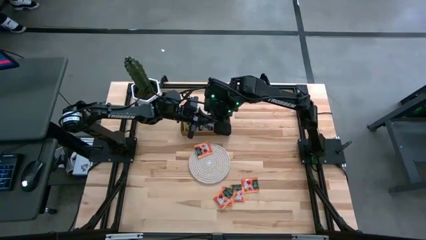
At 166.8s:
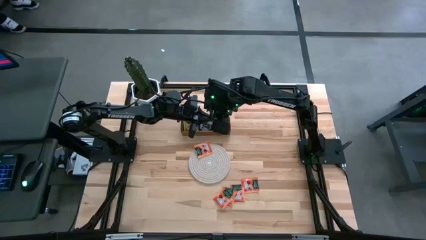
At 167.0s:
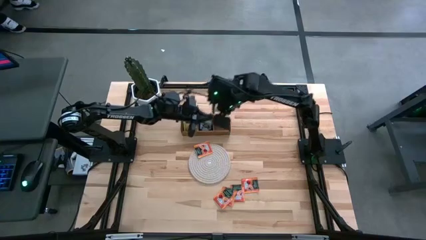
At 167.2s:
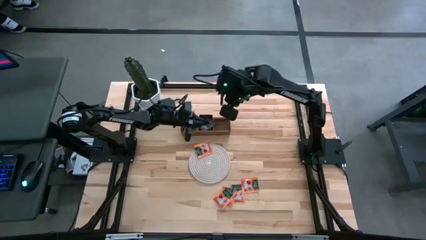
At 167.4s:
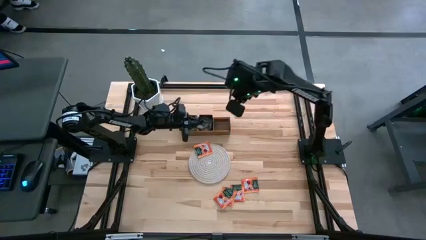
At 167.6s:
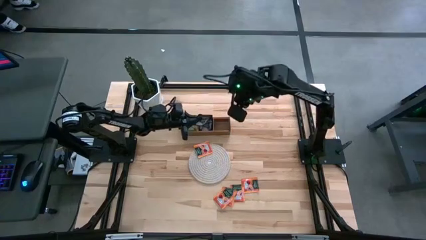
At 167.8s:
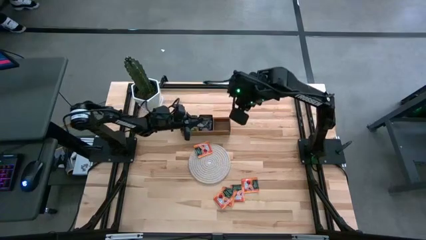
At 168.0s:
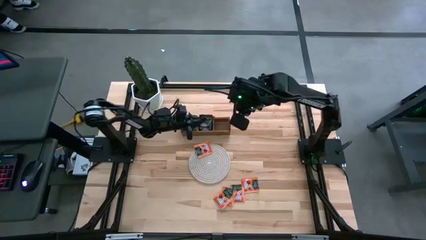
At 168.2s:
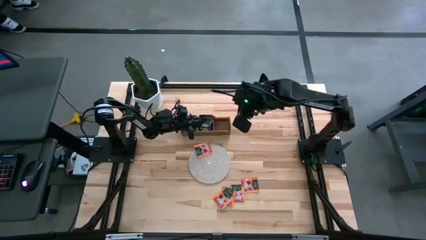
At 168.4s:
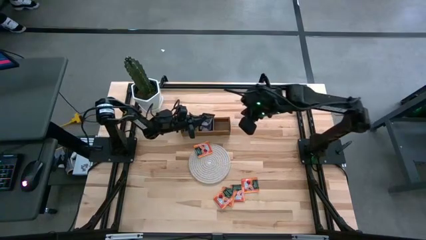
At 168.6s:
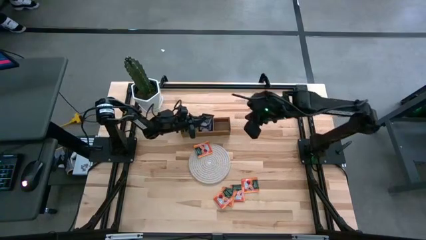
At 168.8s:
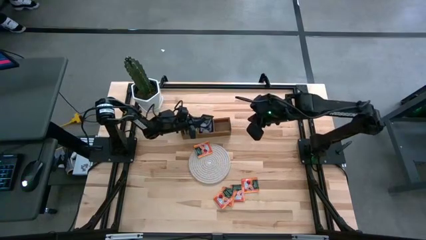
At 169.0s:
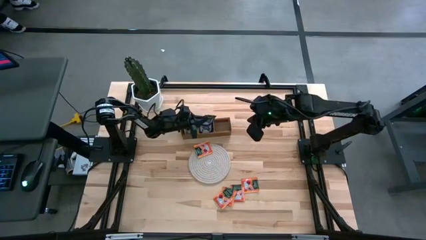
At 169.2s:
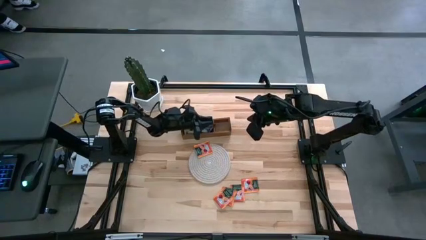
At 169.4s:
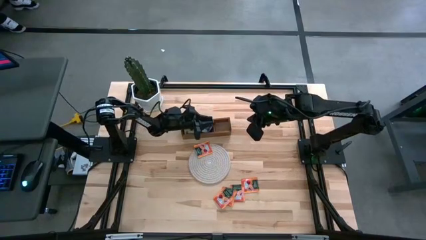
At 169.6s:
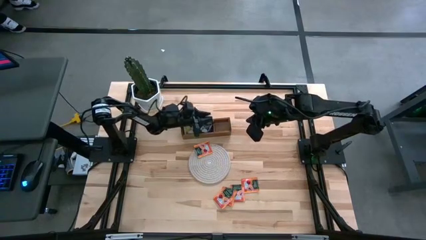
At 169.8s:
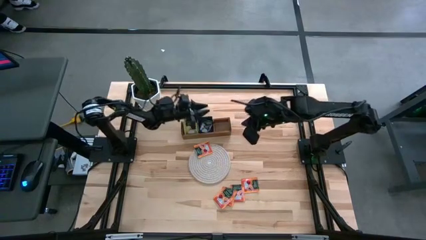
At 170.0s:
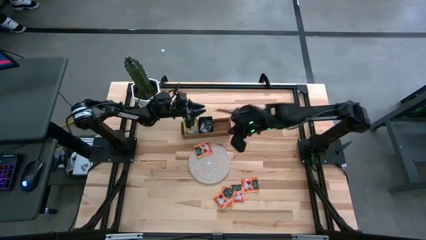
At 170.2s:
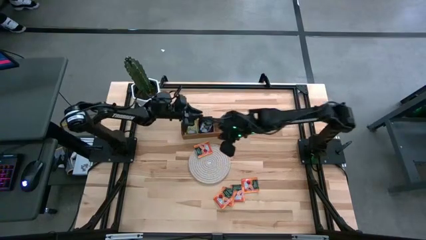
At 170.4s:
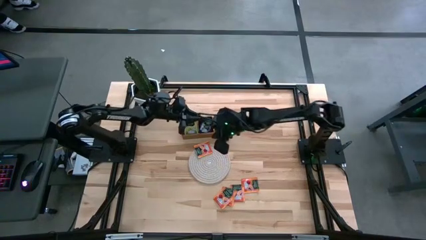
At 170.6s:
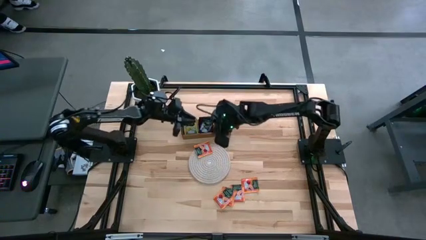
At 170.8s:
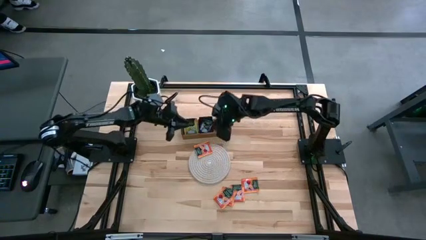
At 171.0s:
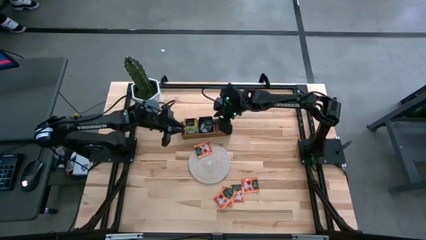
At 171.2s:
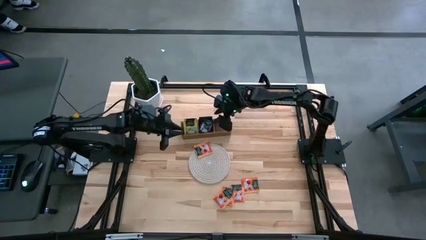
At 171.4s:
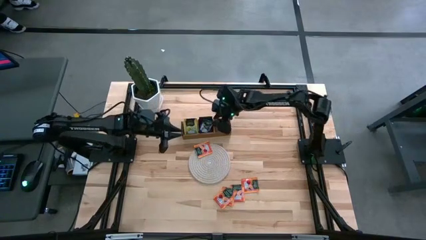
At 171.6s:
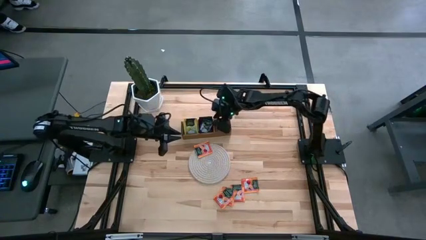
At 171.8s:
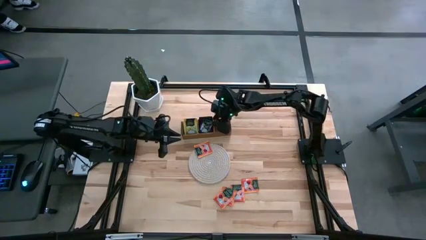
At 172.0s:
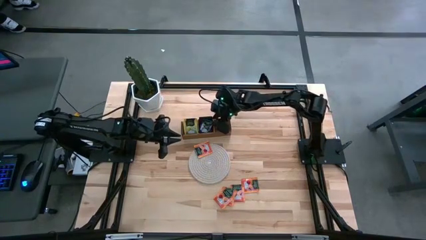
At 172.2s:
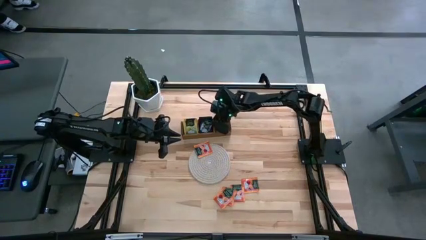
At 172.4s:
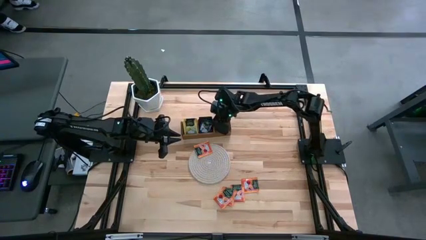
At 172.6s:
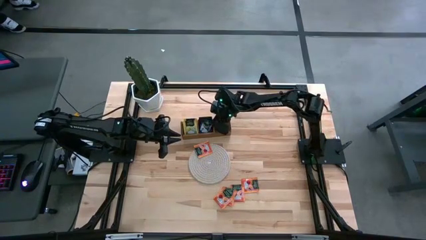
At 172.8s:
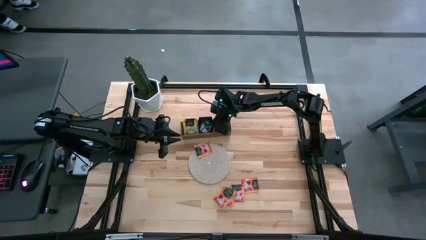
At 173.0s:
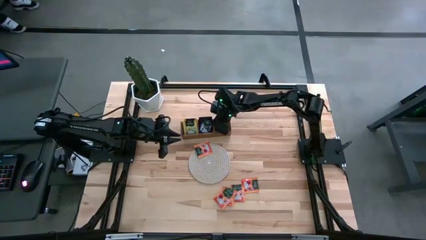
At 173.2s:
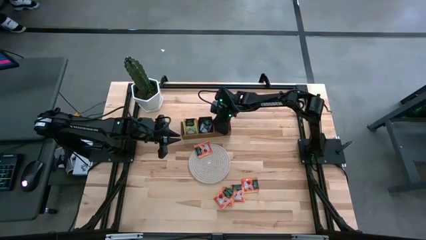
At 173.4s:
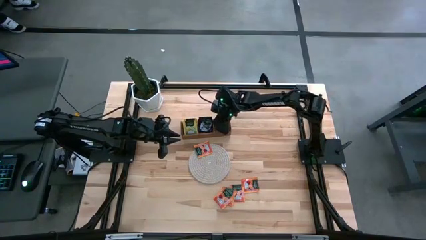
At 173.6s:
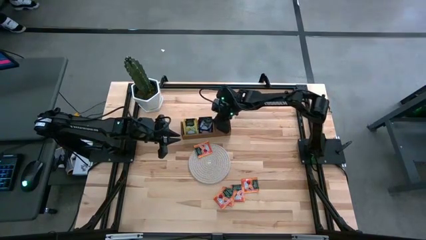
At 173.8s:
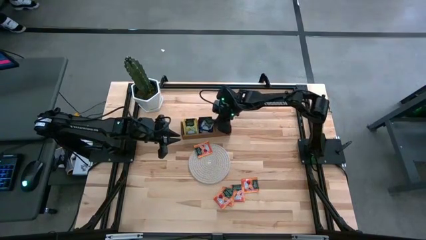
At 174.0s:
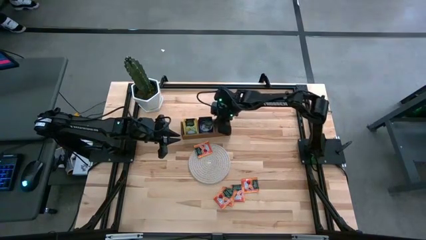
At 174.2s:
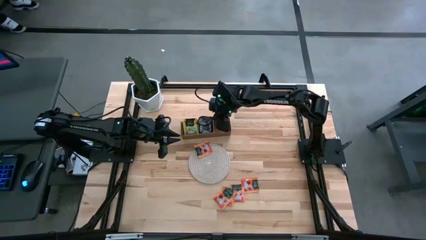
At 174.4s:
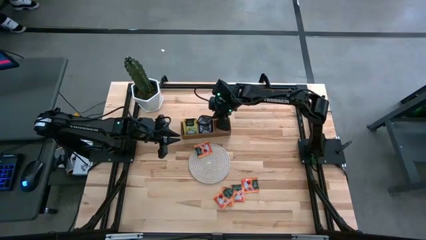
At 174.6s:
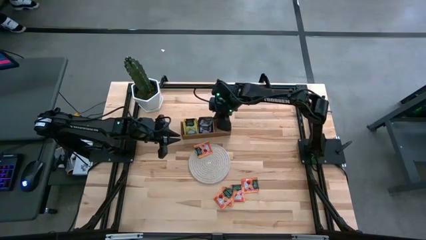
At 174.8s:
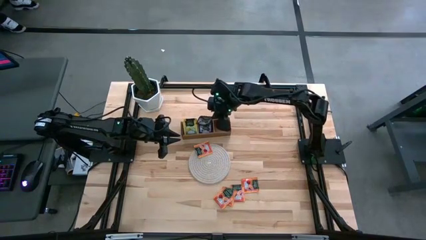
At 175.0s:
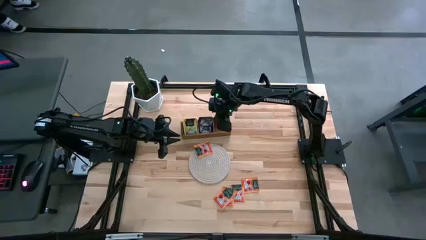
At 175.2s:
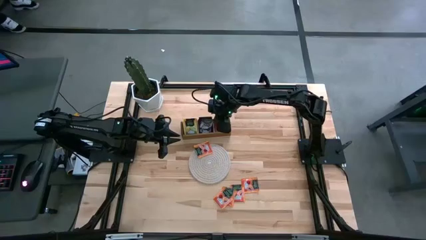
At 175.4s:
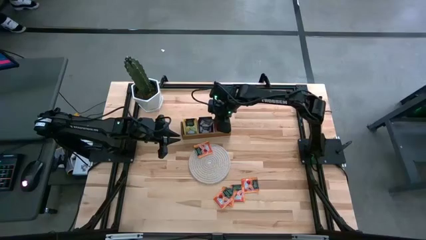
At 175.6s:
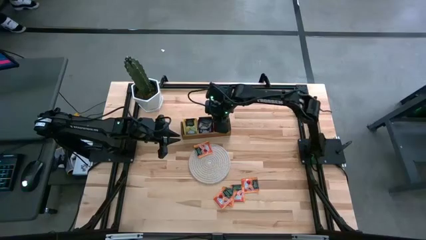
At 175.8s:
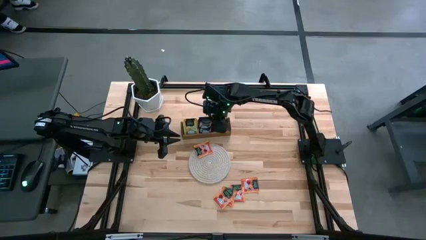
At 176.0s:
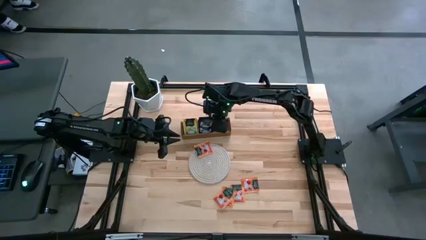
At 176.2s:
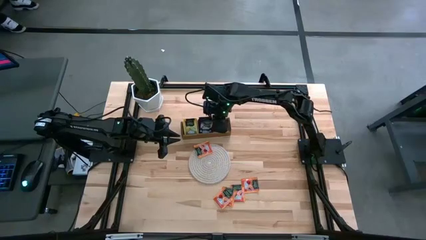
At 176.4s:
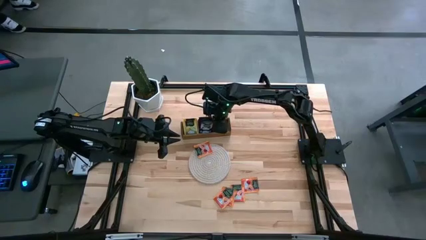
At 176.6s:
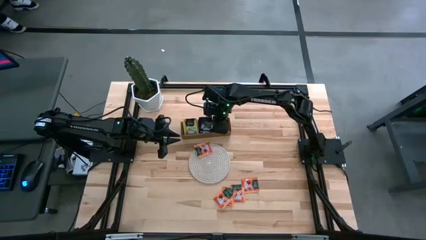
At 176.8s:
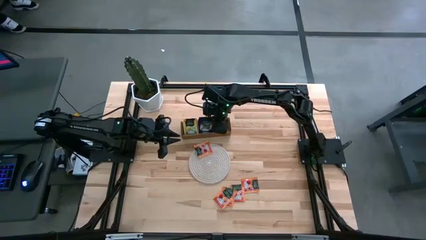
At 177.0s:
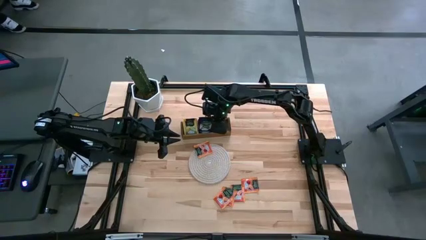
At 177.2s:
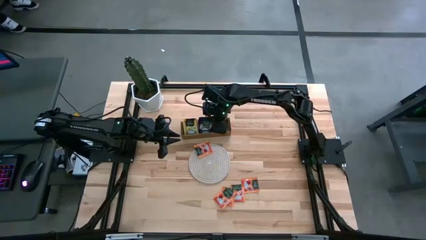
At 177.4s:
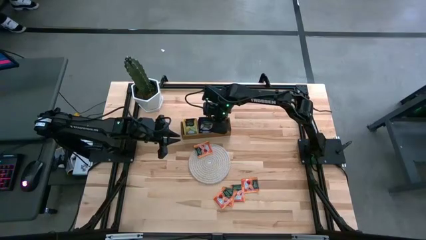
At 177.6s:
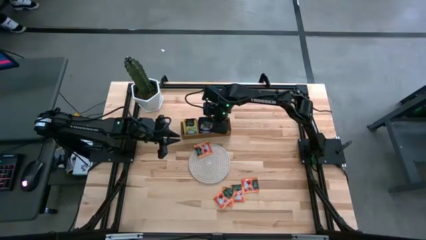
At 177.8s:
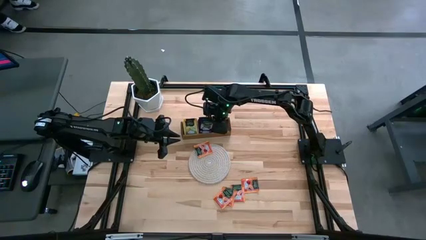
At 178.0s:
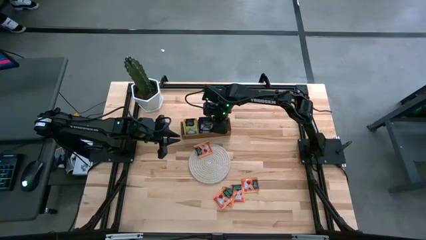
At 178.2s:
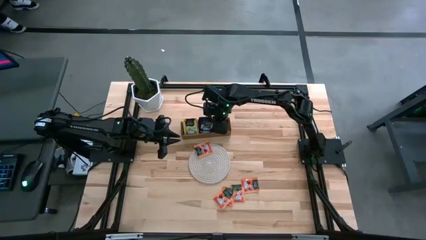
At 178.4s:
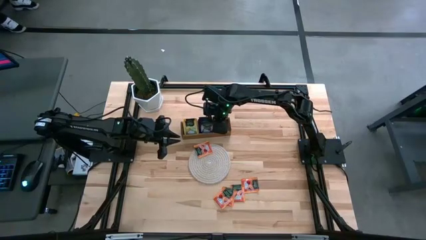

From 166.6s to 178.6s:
Task: Pick & Place Tea
Put the purple tea bag into the middle section of the wooden organizer

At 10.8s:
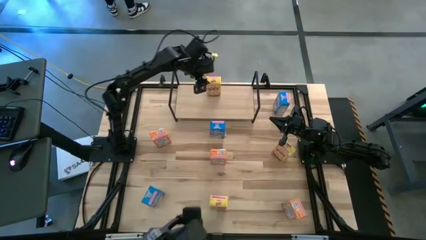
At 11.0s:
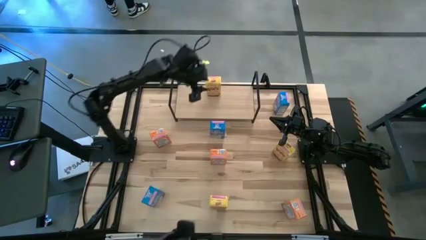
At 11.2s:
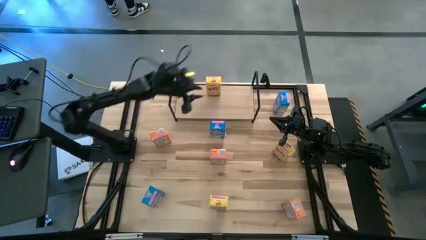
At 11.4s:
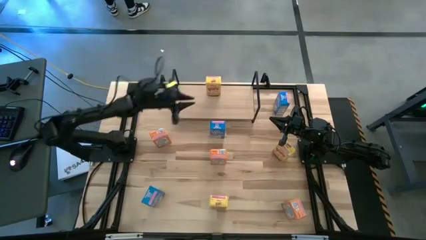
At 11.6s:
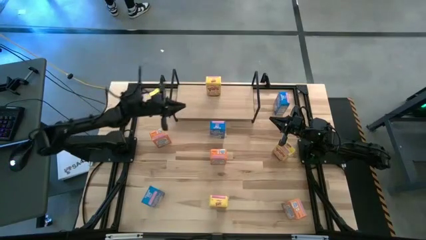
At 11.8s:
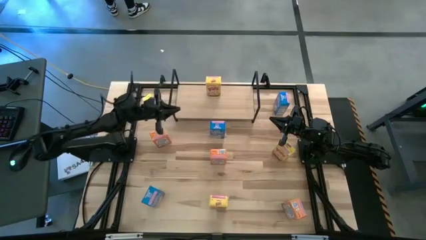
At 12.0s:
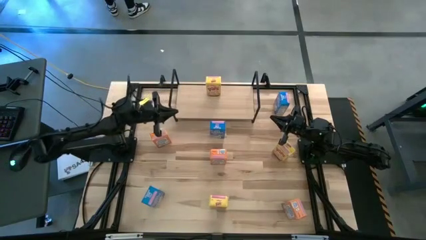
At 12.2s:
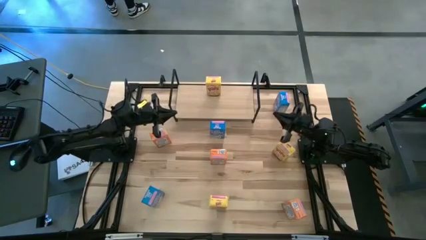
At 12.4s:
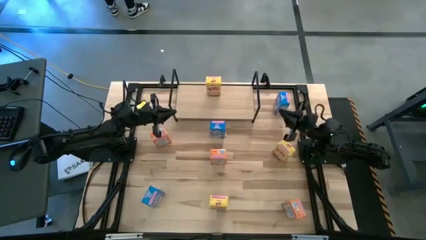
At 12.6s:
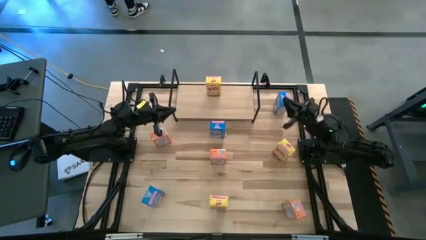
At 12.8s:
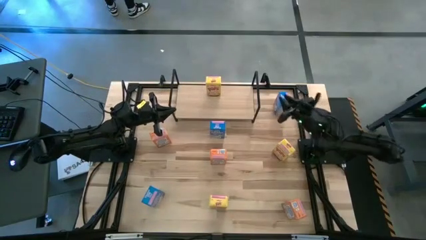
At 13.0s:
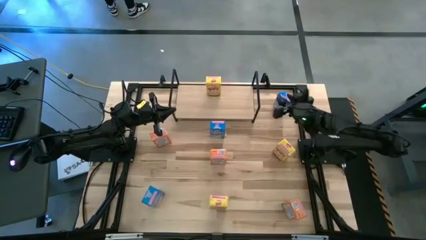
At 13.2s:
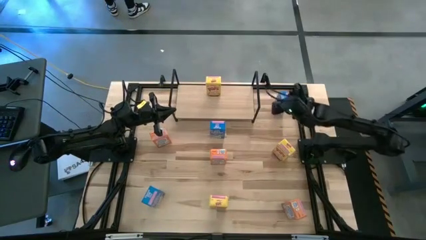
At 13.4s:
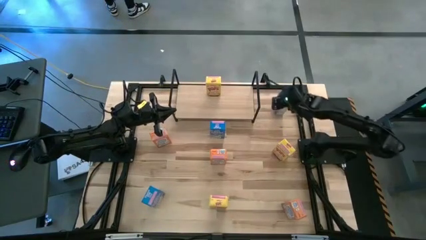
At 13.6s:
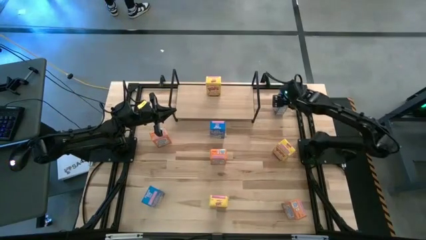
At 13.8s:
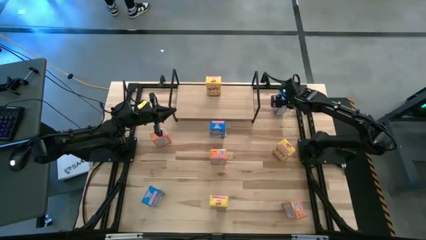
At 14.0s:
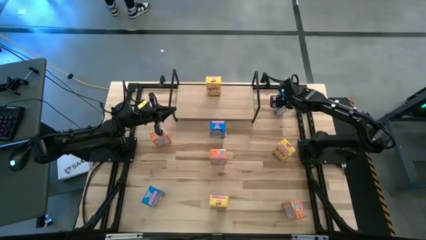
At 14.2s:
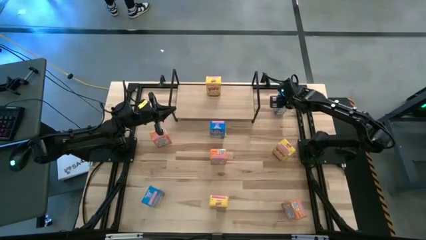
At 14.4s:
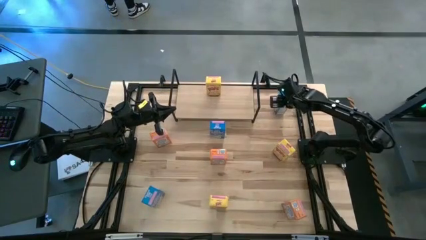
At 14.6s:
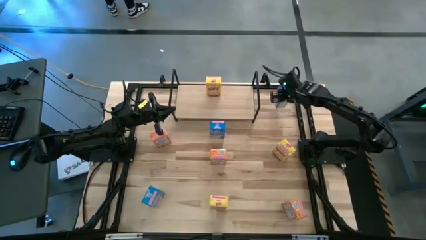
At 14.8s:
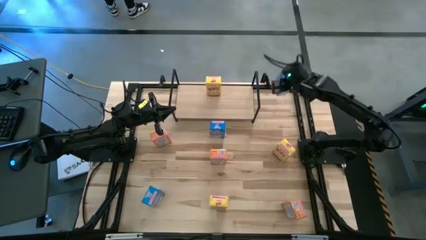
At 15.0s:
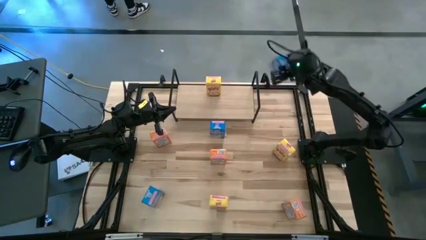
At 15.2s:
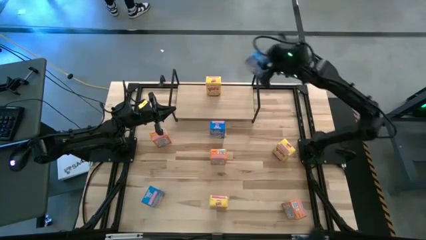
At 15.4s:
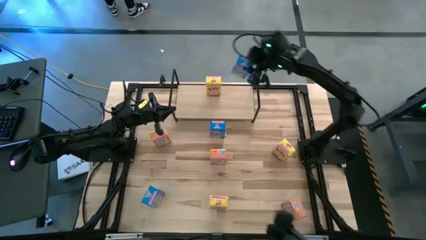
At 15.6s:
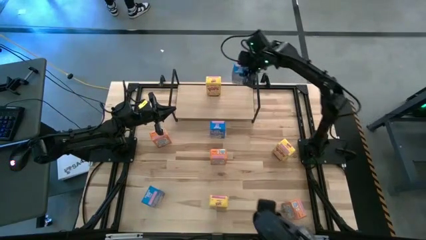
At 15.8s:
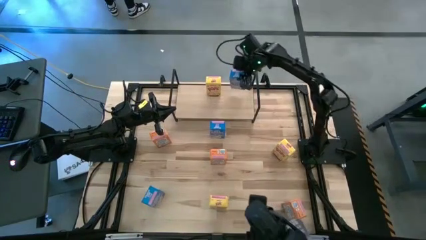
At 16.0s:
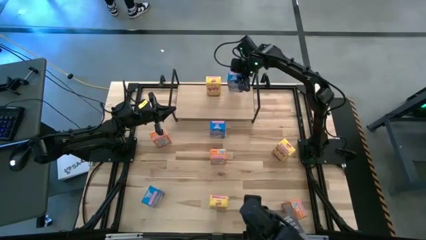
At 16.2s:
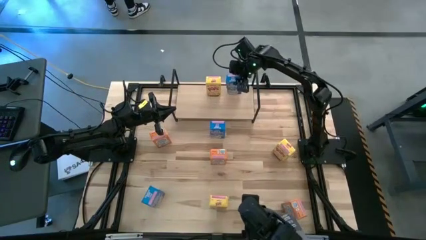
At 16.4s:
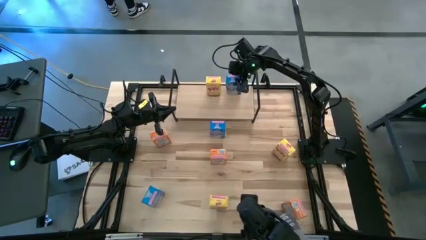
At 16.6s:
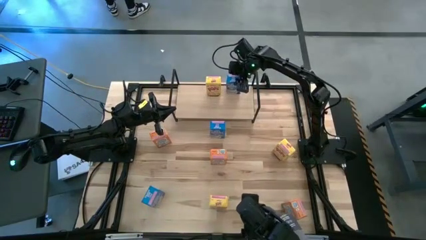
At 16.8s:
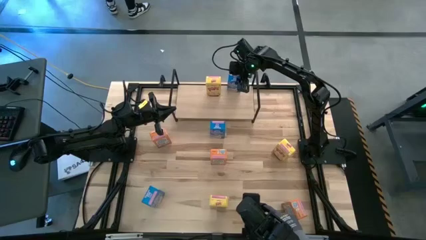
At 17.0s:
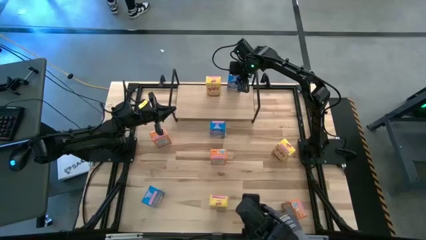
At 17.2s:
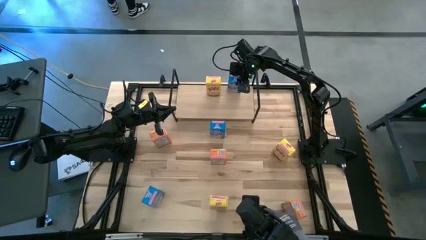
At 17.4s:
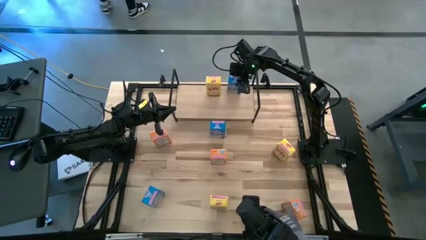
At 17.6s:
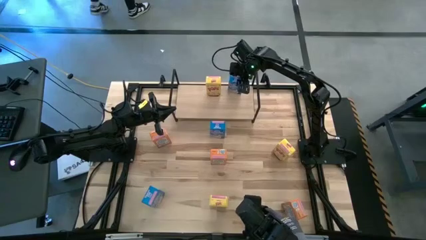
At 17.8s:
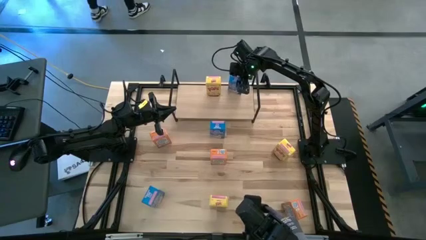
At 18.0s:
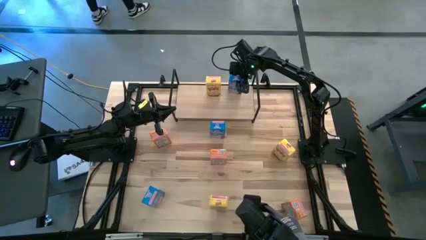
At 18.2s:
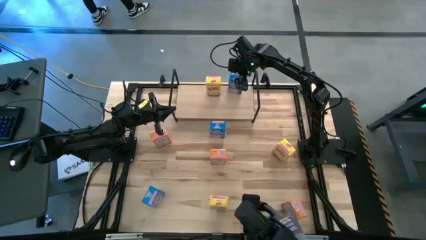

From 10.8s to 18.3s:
Task: Stack cereal on shelf
Put the right blue cereal box on the shelf
